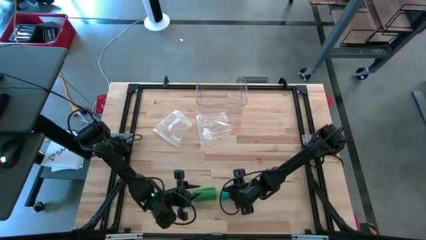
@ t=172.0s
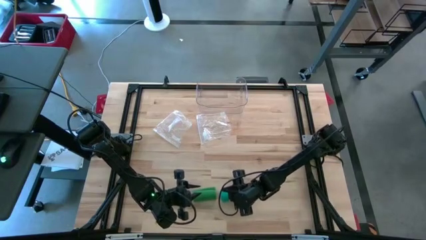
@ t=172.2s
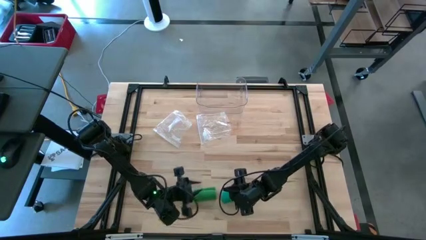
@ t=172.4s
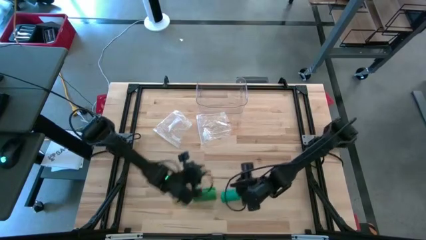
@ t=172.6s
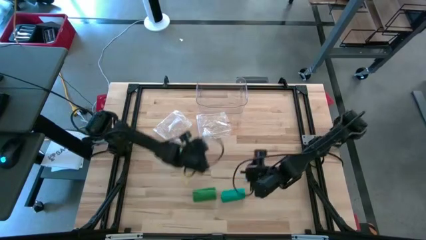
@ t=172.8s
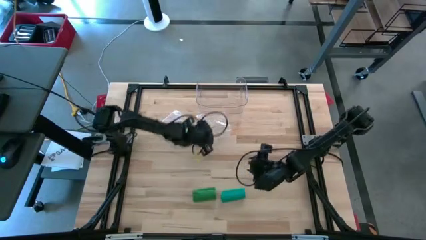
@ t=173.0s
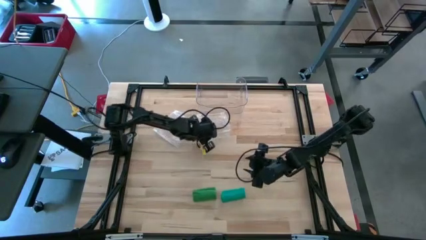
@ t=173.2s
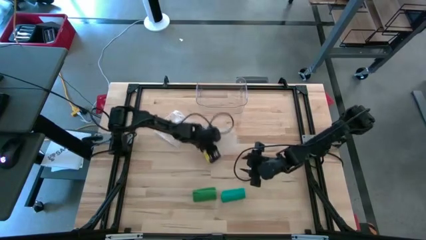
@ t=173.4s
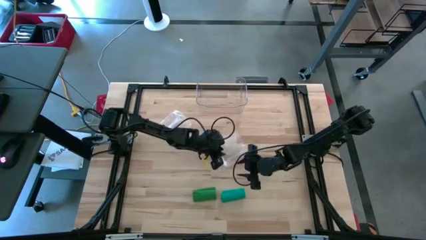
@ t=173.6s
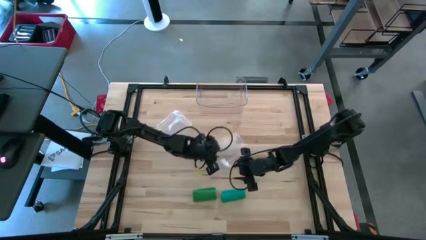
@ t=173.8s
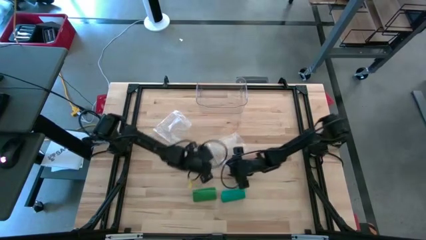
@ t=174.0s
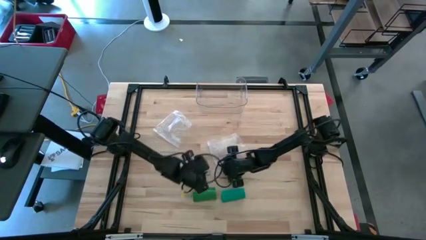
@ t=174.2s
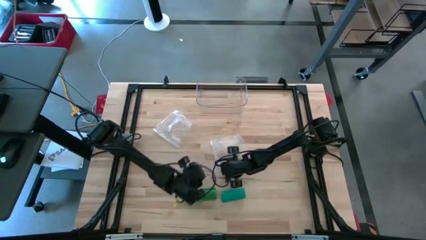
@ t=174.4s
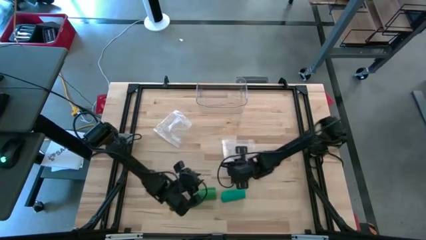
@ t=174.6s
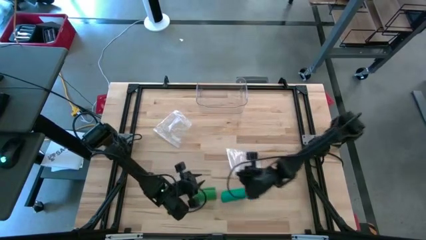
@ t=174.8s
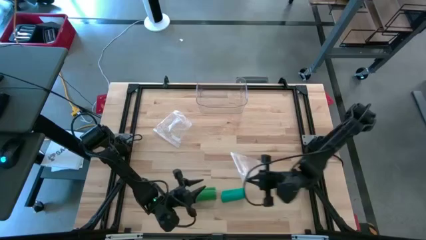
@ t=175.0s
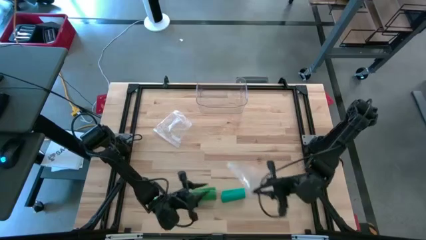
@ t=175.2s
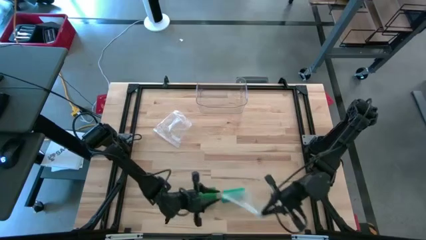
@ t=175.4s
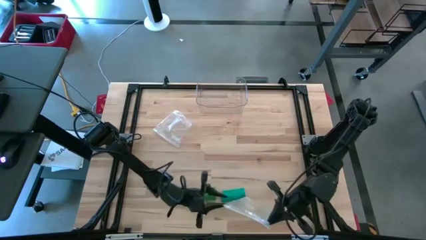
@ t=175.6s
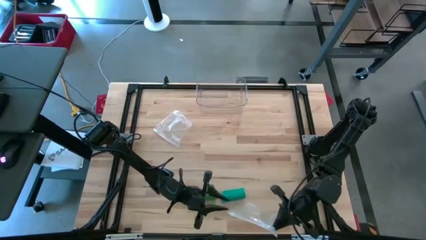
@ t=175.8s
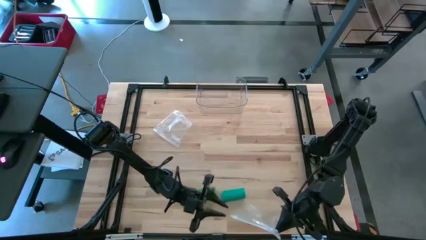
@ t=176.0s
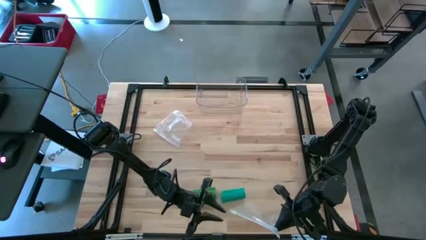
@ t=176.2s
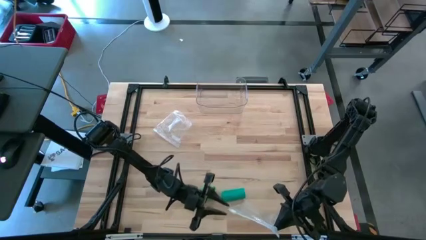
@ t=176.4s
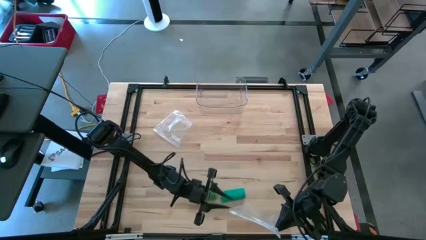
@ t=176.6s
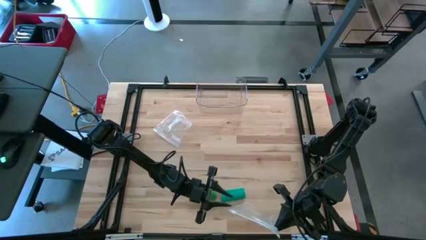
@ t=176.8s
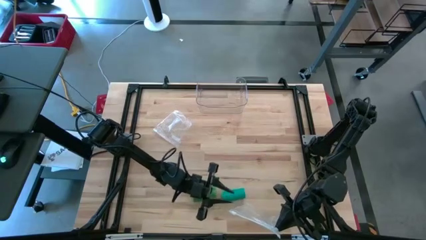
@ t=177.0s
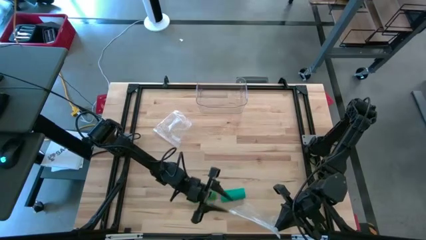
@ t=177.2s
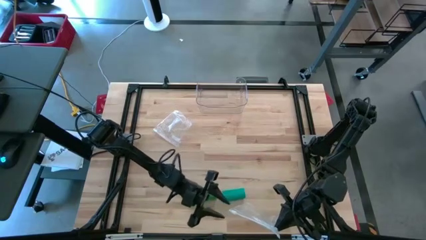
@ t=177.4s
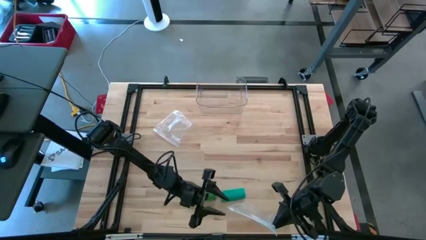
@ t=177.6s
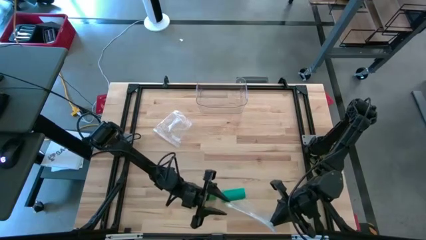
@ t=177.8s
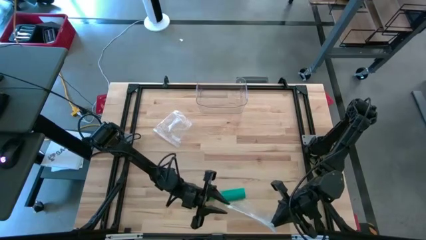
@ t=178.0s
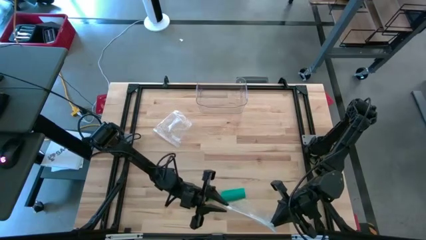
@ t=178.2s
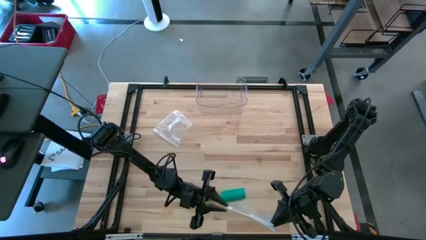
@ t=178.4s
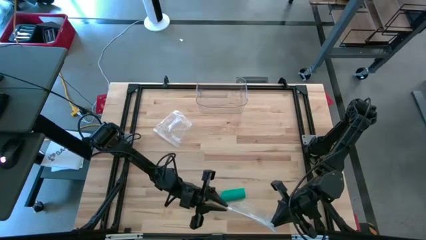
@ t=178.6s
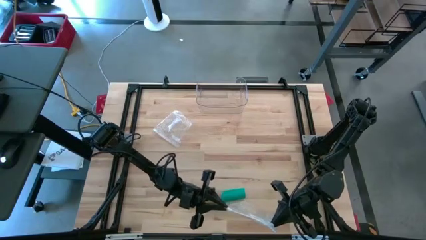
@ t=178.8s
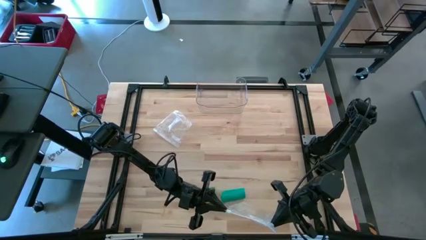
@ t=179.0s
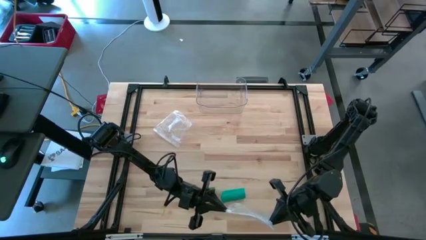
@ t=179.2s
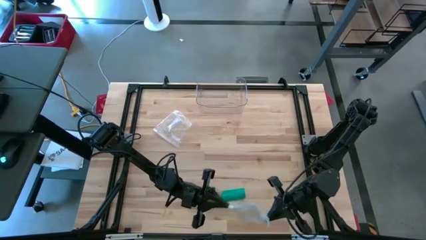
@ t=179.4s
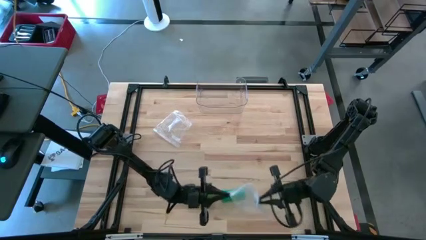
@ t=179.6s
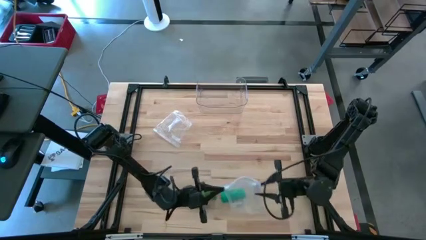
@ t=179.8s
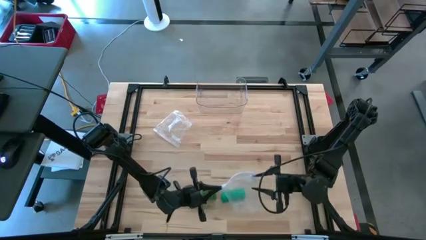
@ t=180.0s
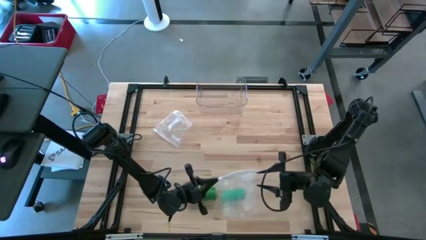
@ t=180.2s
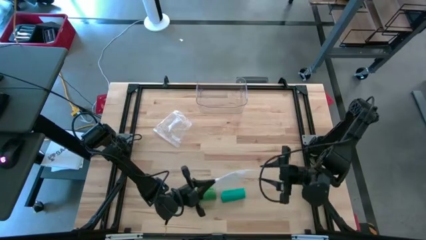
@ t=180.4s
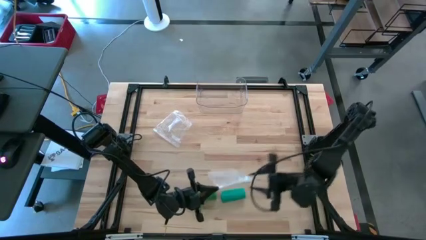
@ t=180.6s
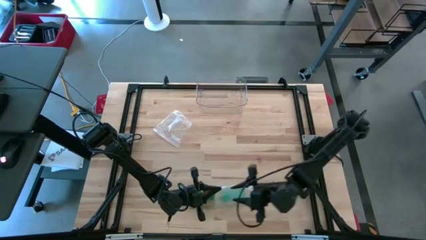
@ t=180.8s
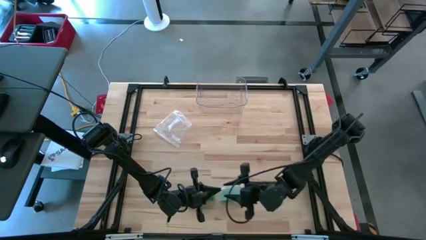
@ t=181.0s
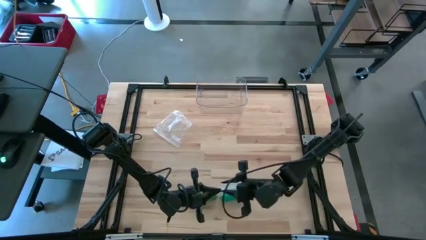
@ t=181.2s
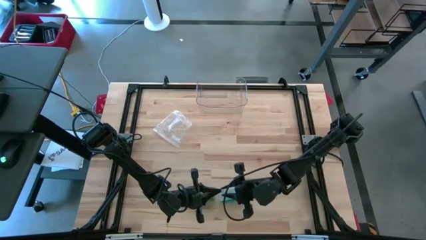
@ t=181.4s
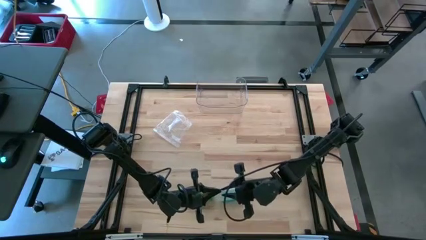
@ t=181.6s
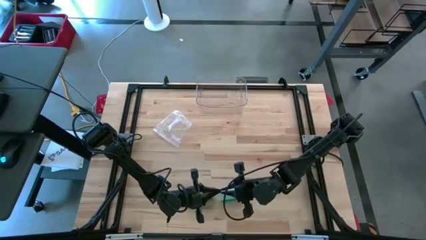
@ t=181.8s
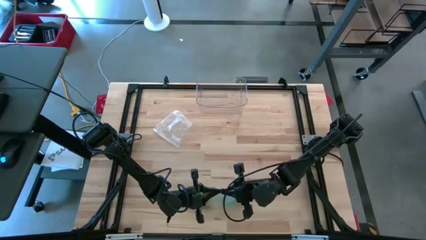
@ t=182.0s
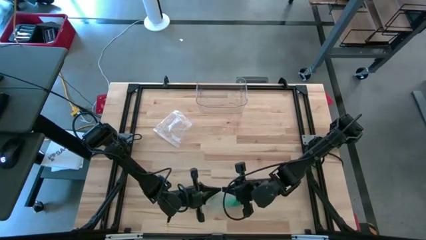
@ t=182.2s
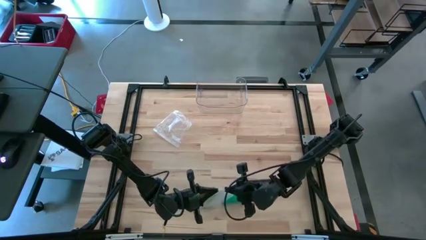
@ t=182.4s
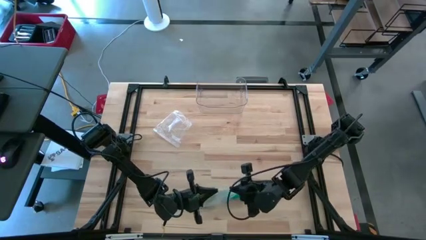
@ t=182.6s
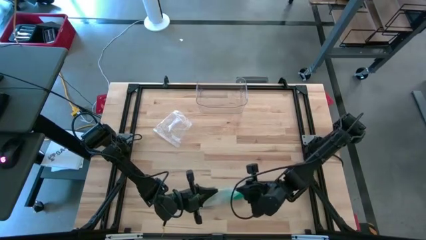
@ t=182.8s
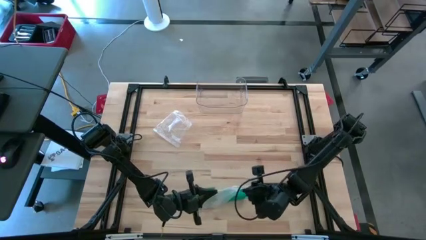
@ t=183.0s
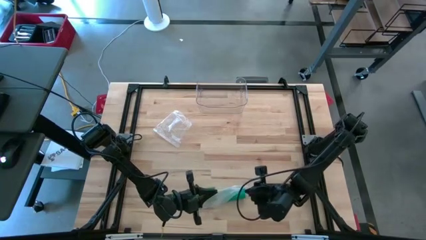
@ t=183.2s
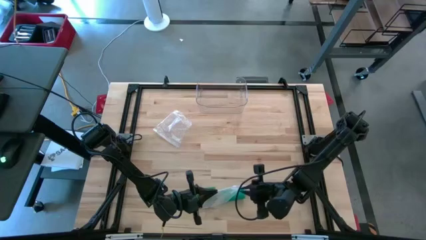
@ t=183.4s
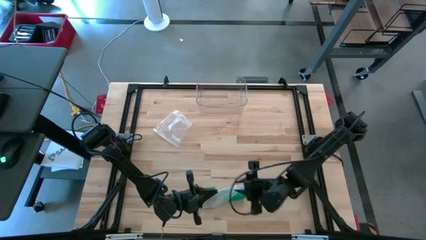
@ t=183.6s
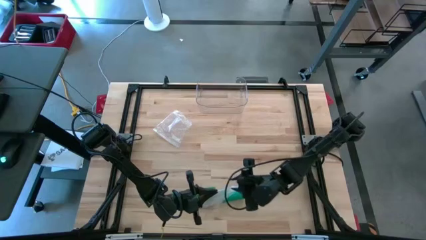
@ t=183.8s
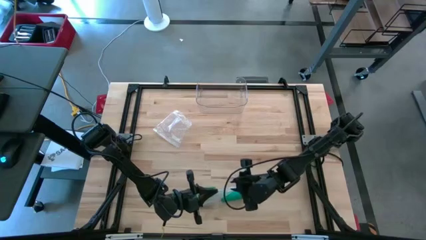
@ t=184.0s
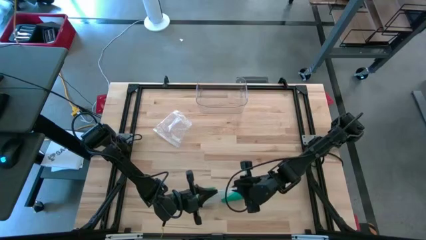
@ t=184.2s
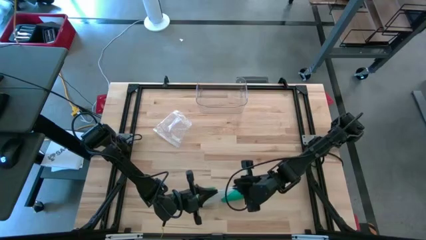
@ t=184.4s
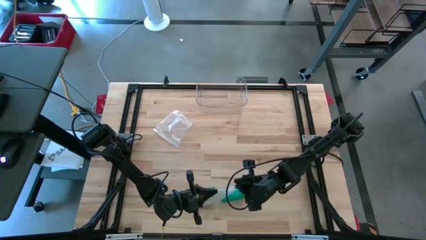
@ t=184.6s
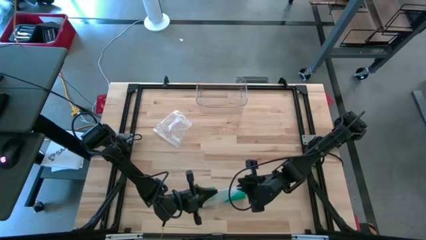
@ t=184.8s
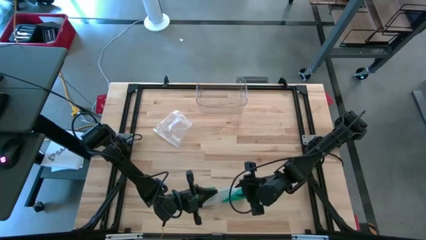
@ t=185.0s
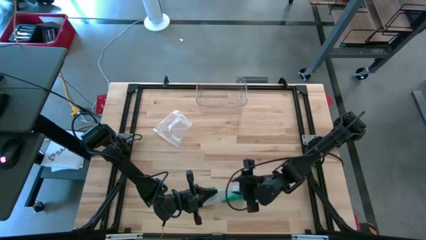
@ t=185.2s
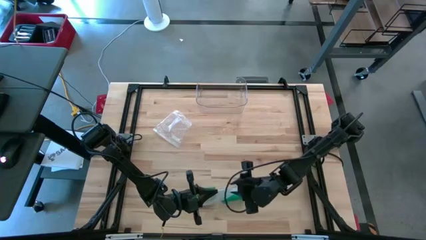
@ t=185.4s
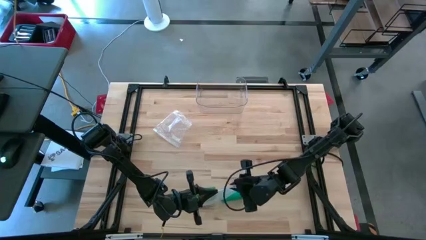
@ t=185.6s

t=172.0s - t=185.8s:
Task: Roll bandage
Open the right transparent zip bag
